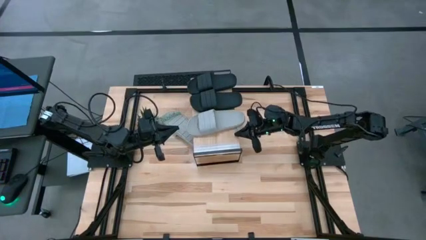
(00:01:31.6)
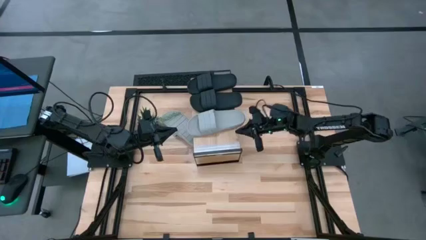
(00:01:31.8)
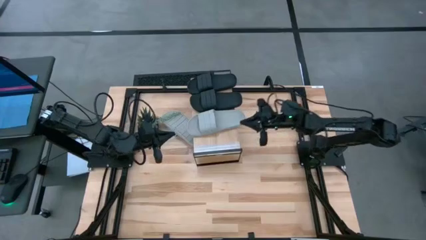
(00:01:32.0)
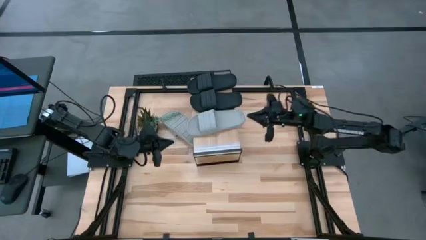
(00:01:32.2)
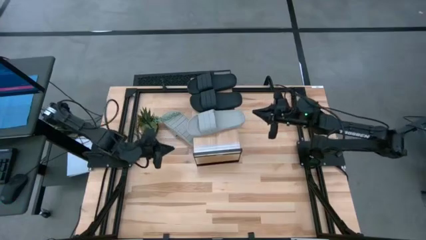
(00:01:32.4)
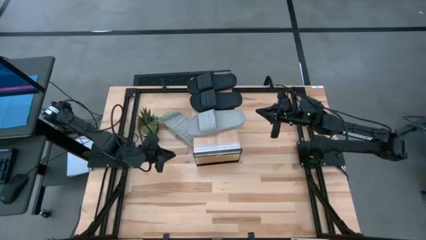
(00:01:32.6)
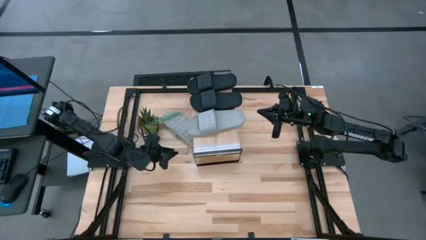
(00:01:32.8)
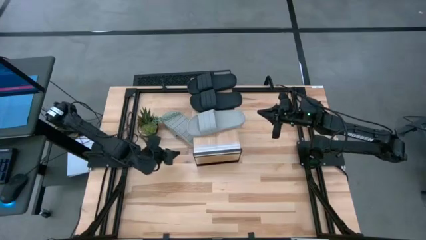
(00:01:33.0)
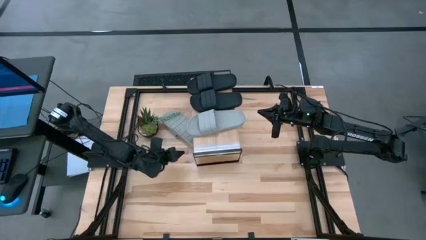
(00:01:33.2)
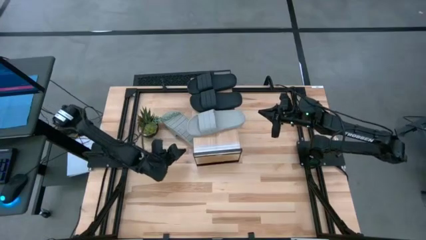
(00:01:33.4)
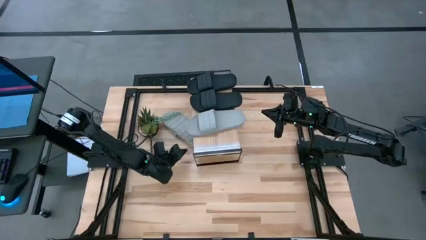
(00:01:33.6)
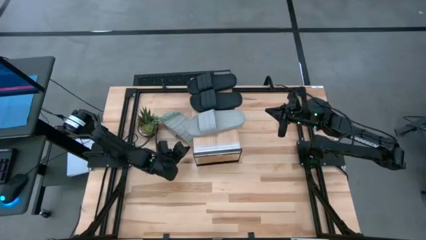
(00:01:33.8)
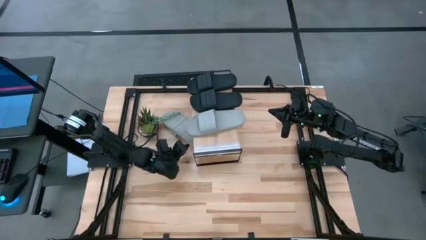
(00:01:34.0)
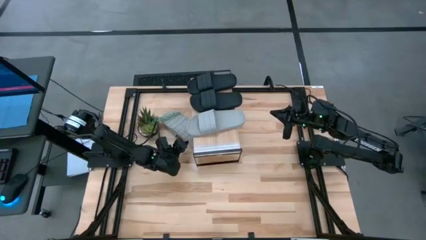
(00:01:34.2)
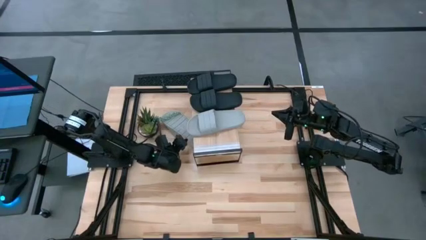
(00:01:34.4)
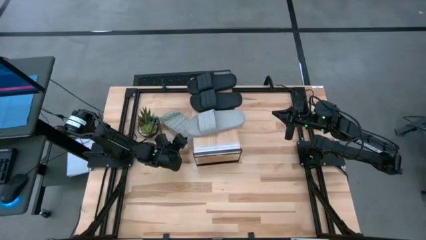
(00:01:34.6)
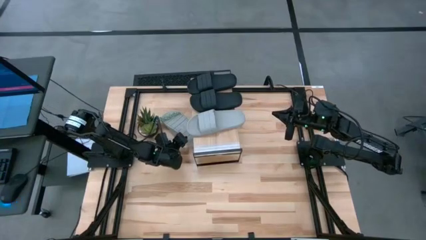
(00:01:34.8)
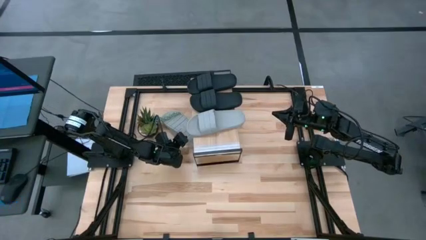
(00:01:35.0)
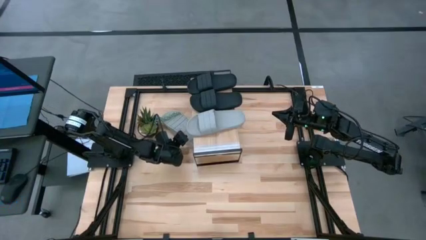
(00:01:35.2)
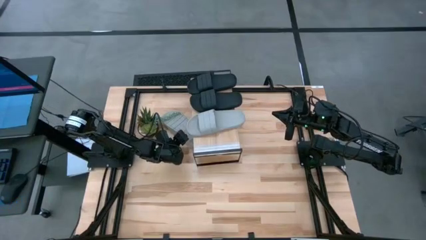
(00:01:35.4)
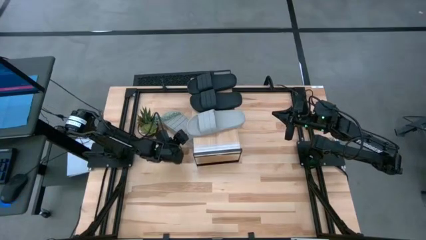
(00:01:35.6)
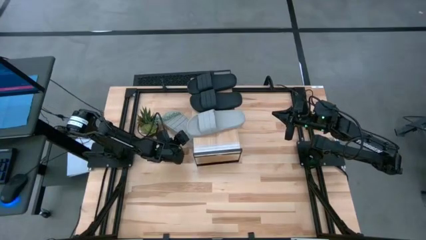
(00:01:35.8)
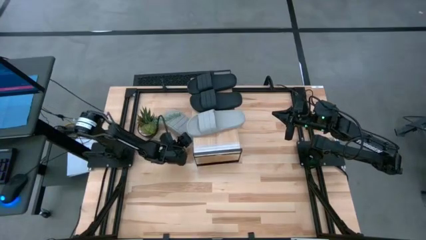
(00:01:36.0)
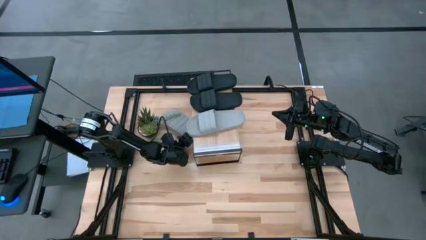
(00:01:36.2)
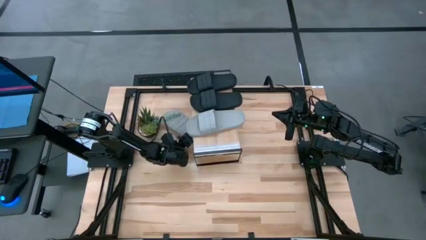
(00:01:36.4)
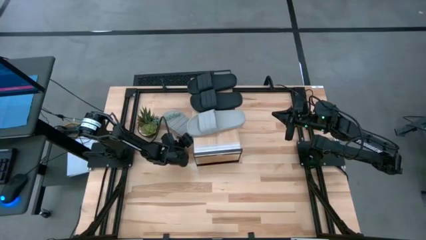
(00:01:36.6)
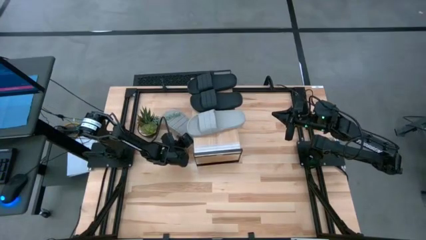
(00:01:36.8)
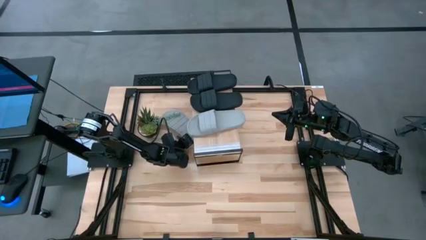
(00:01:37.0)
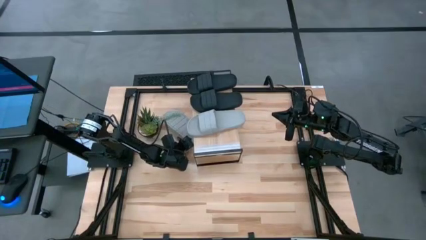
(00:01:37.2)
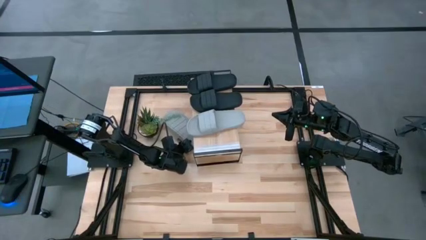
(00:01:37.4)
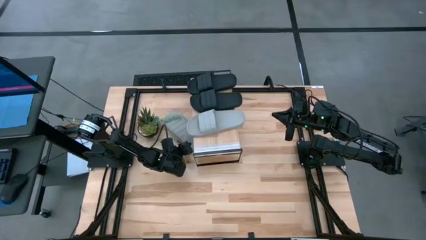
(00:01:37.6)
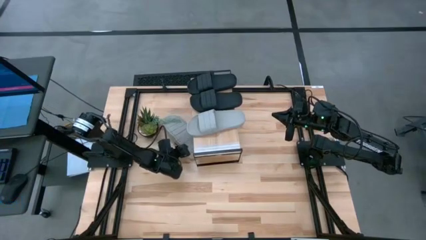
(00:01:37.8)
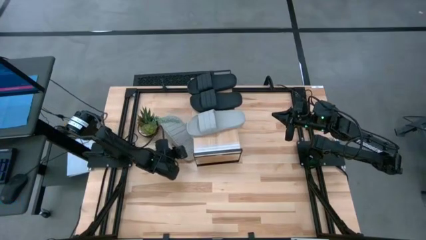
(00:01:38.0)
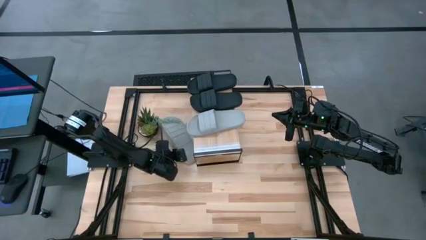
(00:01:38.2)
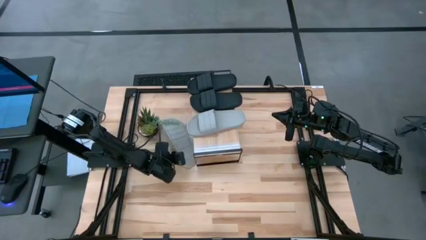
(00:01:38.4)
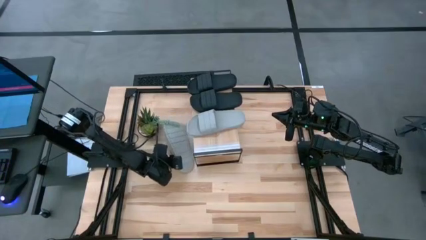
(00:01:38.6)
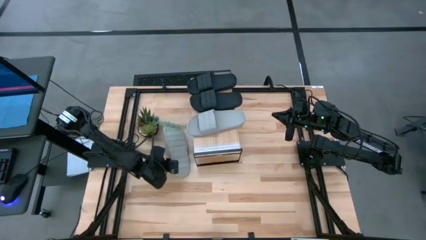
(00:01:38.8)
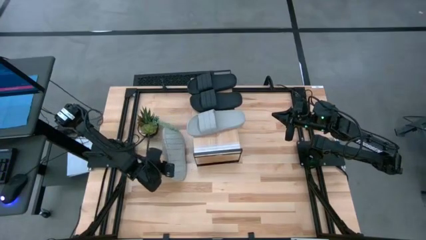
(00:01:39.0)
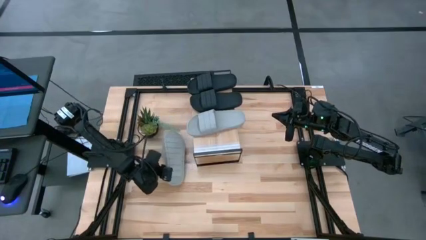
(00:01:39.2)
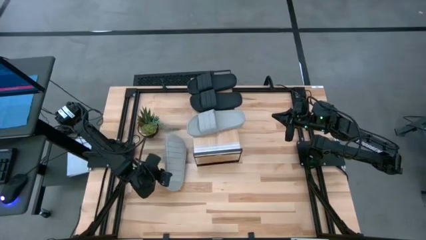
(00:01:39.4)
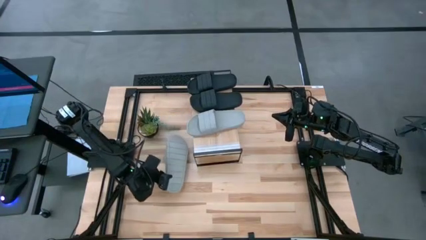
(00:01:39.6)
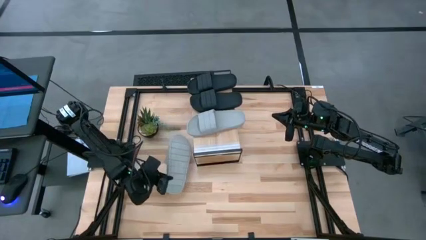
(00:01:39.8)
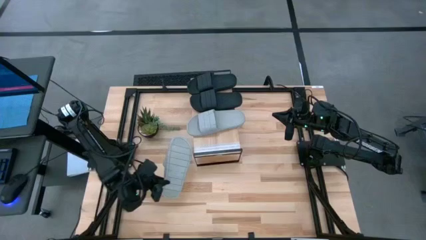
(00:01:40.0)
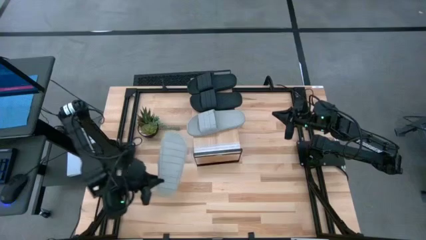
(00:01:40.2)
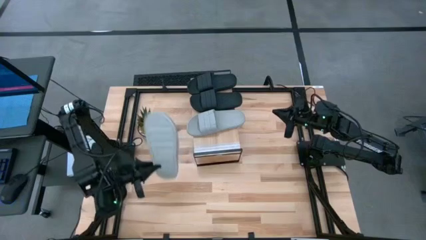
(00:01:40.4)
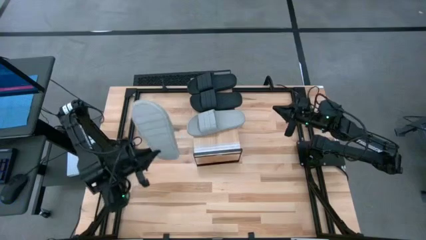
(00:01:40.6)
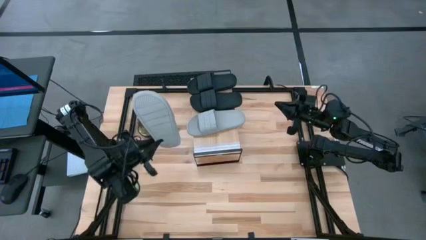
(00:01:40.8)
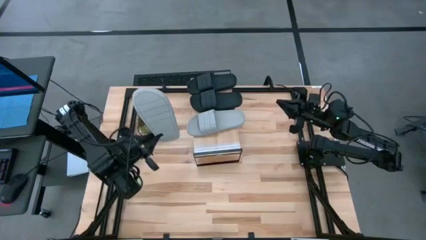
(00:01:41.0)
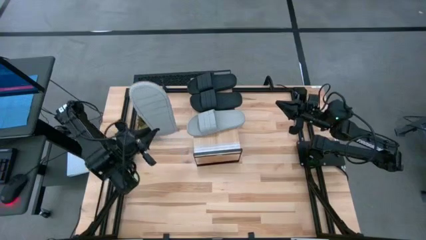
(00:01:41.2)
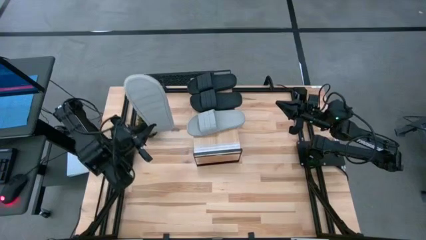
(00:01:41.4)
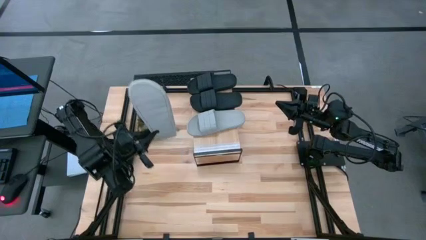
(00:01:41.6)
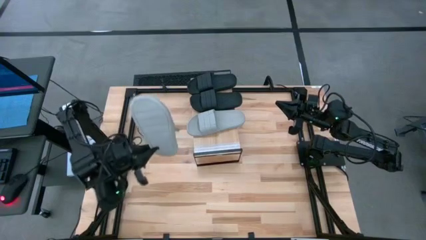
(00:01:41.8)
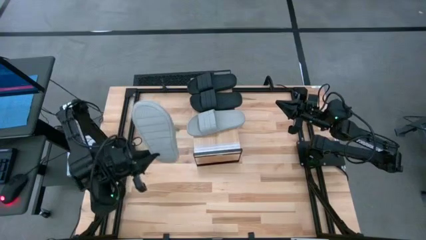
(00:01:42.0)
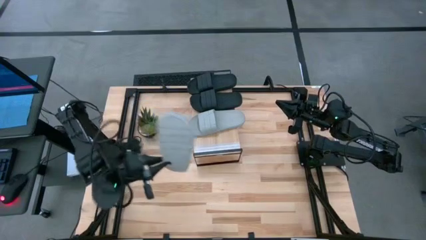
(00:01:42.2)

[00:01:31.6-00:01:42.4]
Task: Pick and place slides into the shelf
Put the gray slide on the shelf
